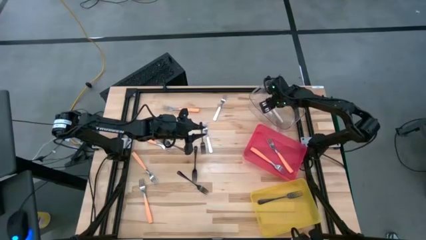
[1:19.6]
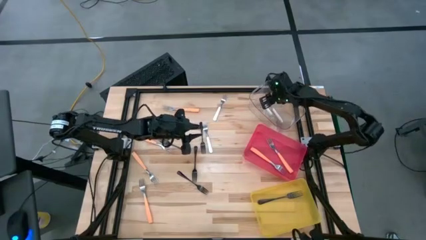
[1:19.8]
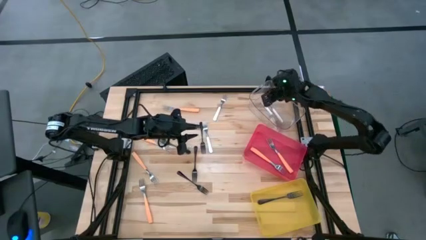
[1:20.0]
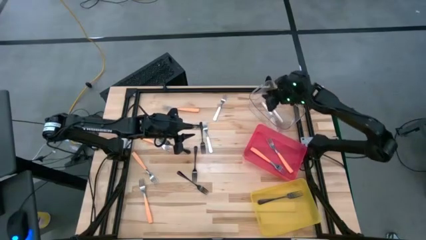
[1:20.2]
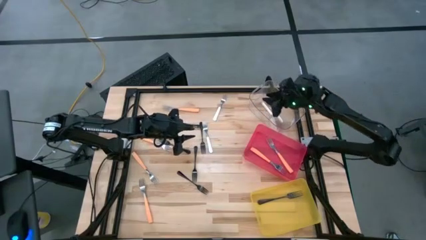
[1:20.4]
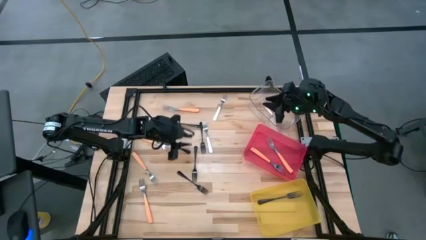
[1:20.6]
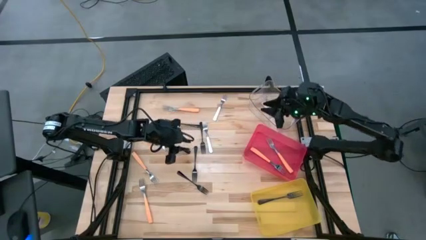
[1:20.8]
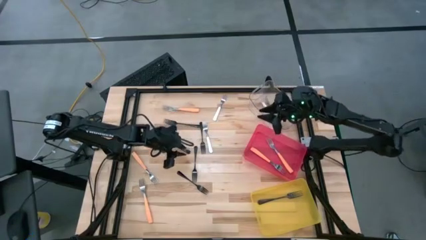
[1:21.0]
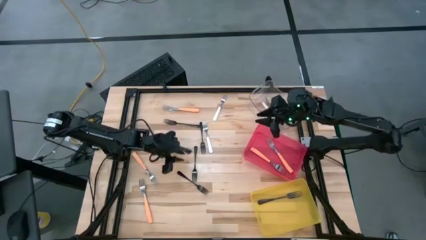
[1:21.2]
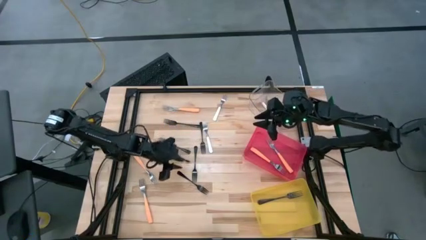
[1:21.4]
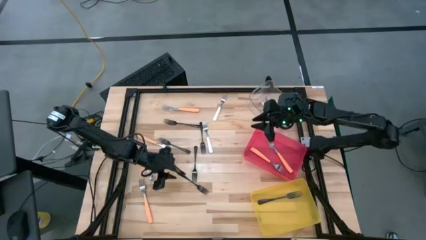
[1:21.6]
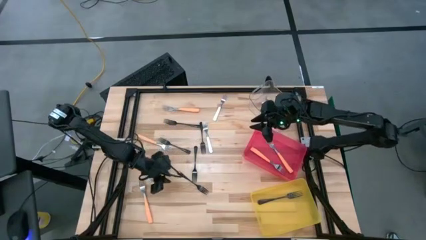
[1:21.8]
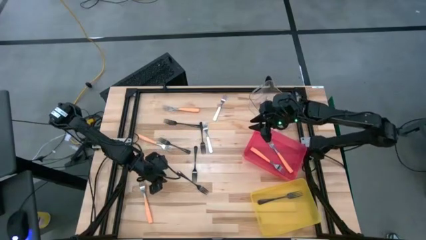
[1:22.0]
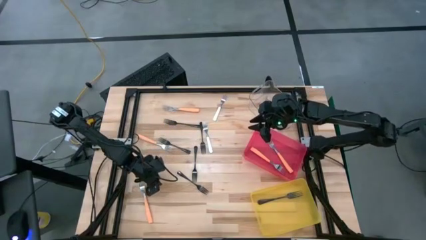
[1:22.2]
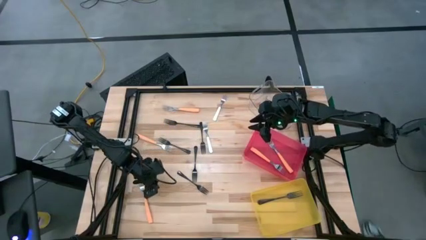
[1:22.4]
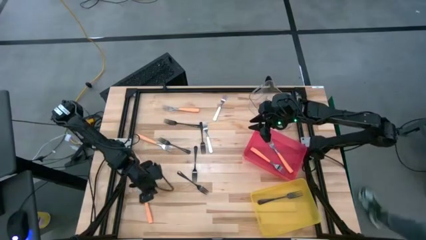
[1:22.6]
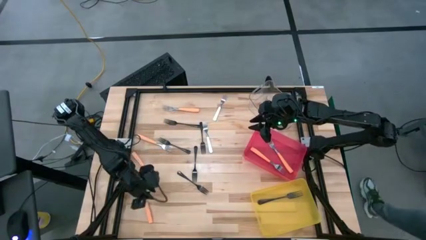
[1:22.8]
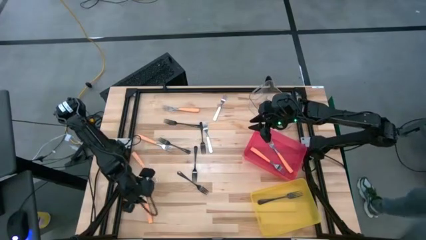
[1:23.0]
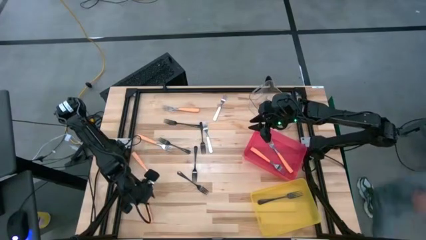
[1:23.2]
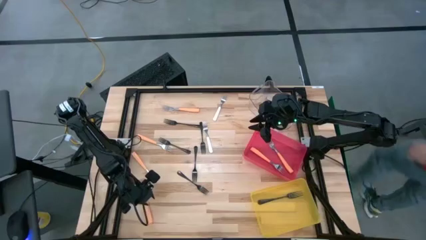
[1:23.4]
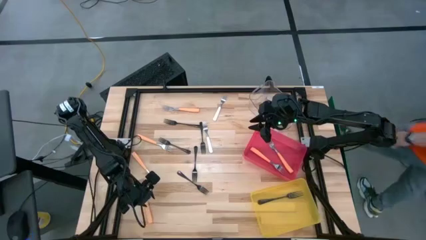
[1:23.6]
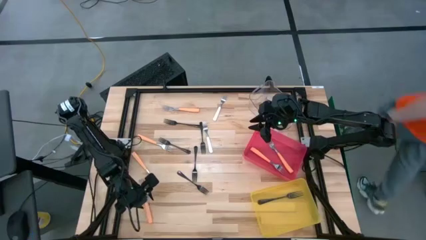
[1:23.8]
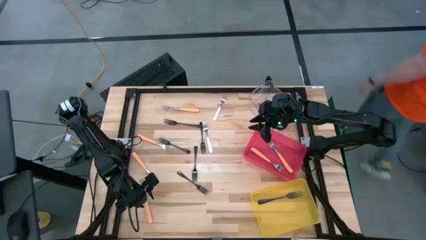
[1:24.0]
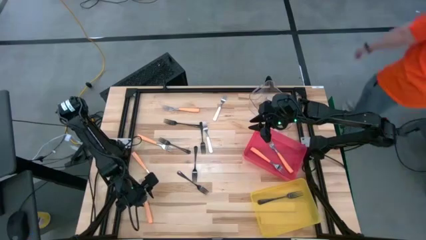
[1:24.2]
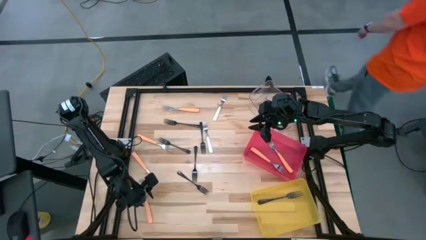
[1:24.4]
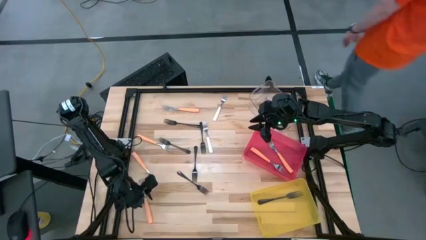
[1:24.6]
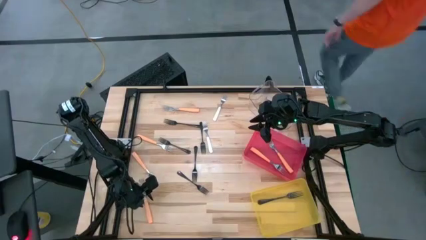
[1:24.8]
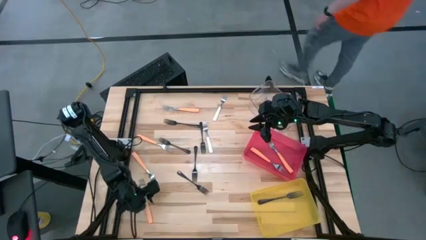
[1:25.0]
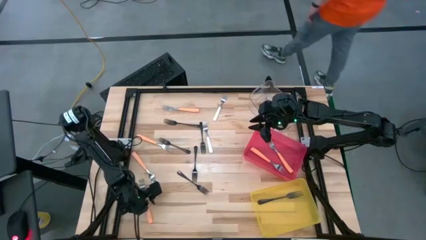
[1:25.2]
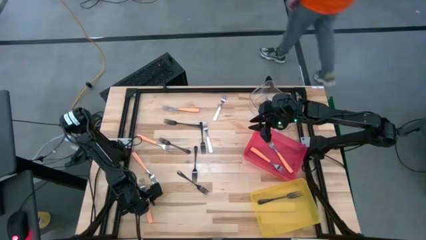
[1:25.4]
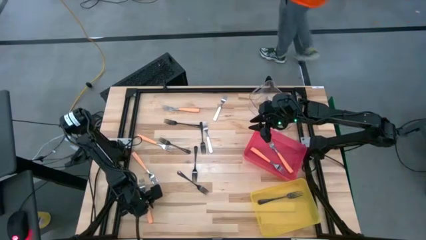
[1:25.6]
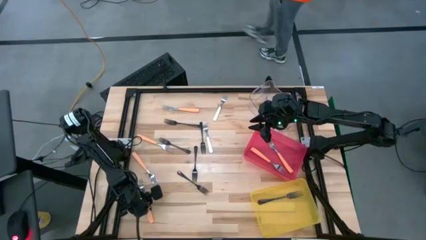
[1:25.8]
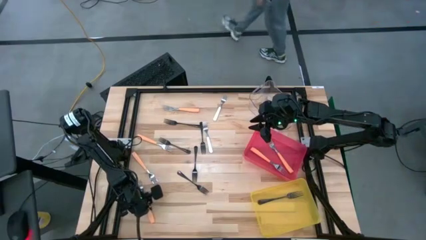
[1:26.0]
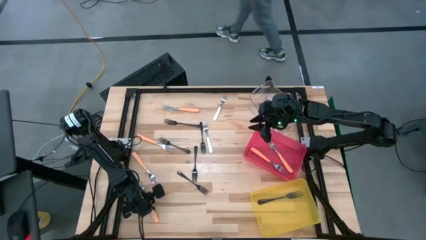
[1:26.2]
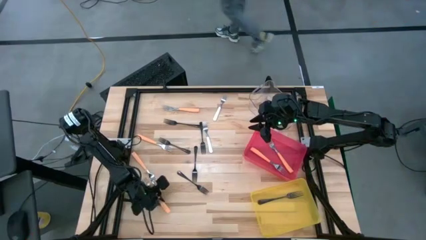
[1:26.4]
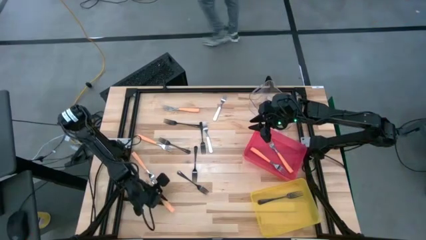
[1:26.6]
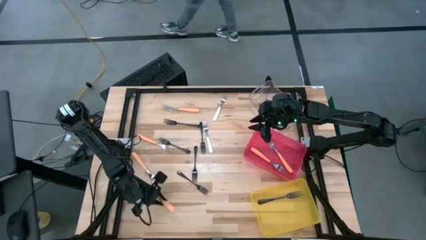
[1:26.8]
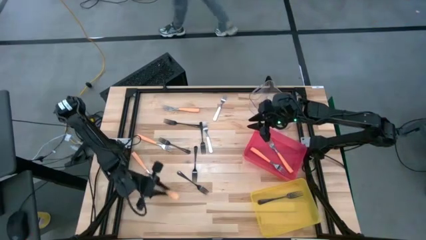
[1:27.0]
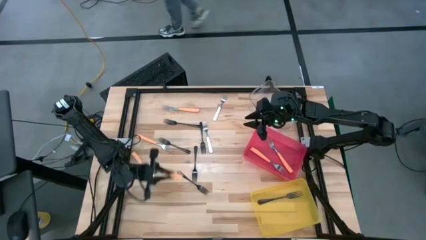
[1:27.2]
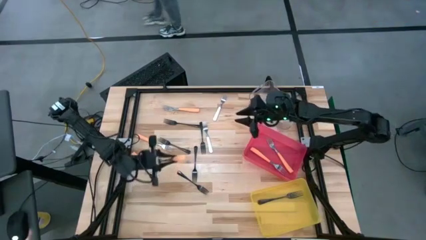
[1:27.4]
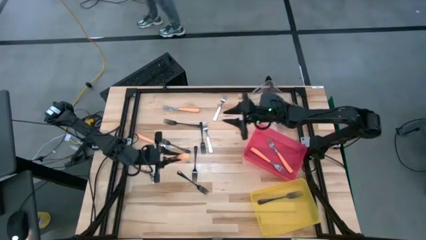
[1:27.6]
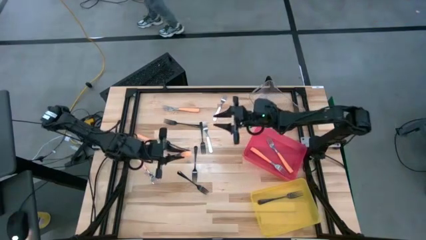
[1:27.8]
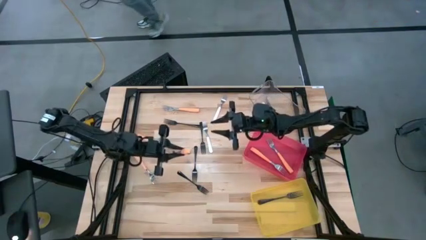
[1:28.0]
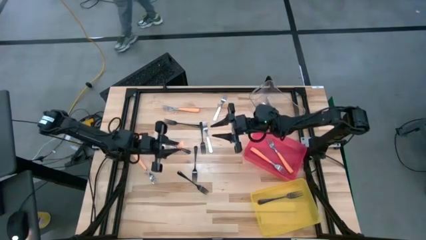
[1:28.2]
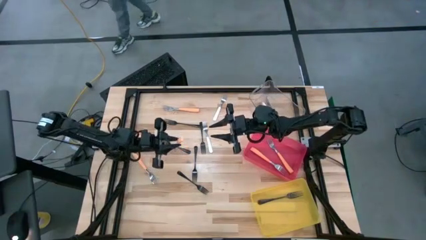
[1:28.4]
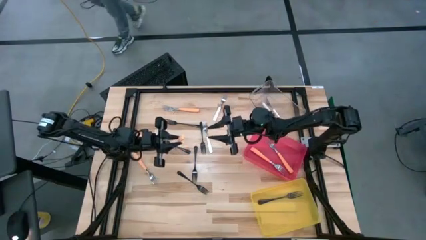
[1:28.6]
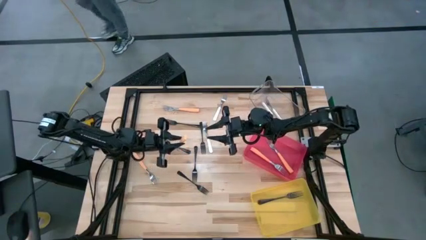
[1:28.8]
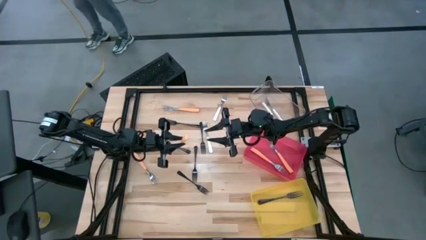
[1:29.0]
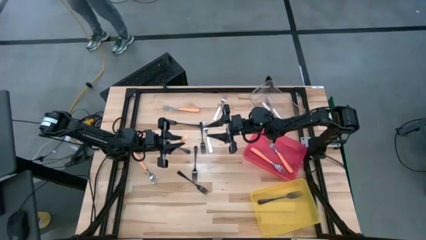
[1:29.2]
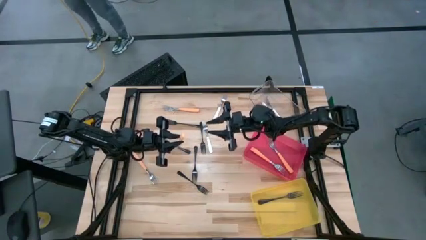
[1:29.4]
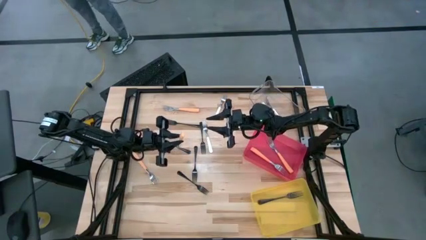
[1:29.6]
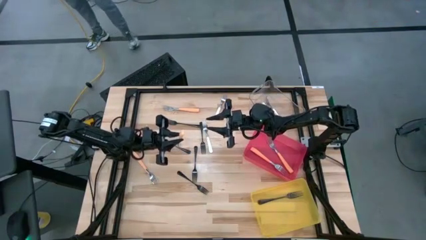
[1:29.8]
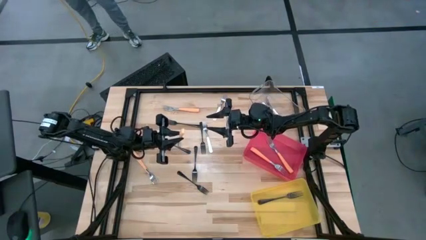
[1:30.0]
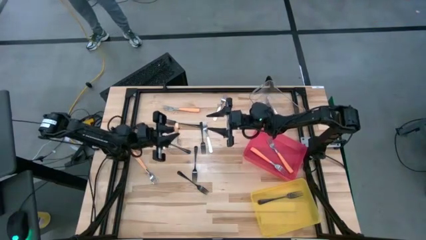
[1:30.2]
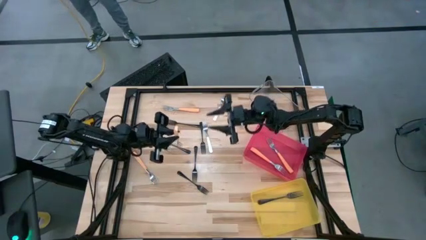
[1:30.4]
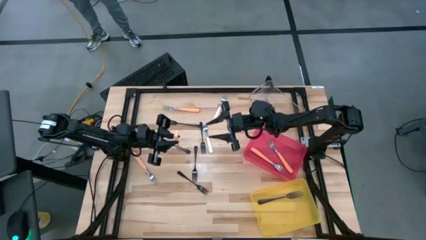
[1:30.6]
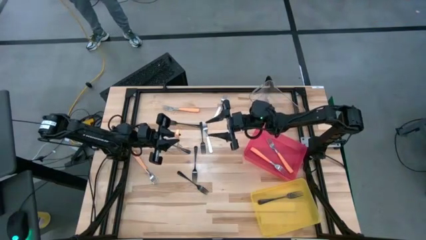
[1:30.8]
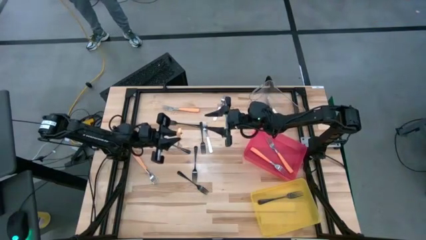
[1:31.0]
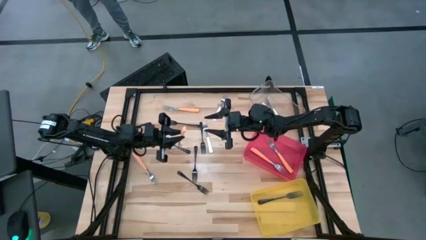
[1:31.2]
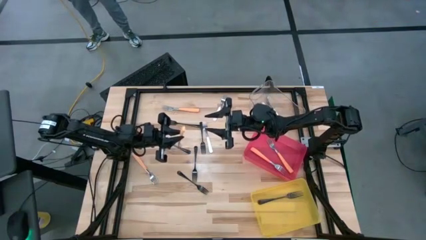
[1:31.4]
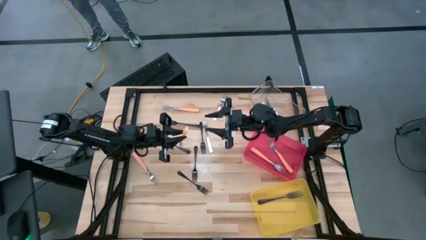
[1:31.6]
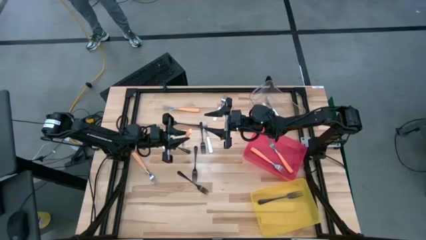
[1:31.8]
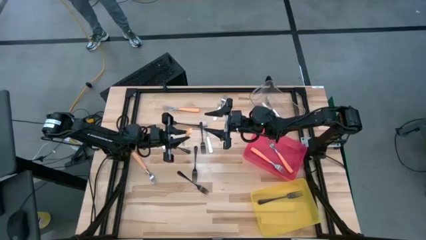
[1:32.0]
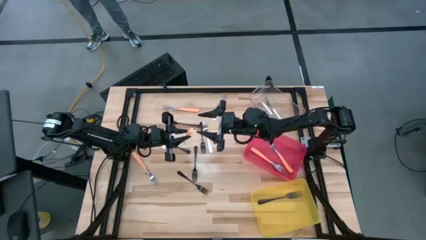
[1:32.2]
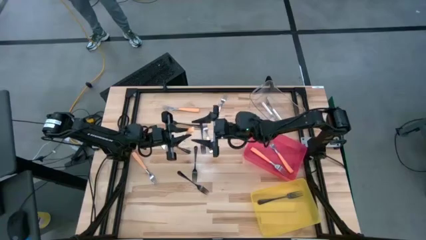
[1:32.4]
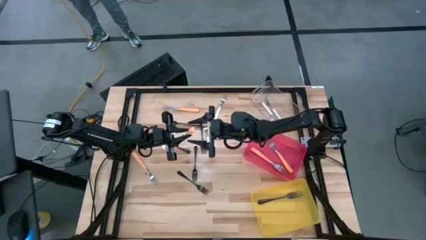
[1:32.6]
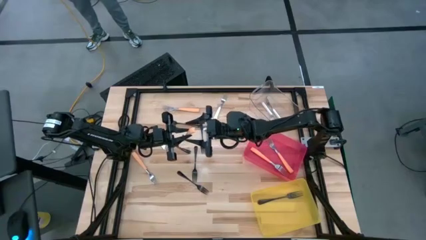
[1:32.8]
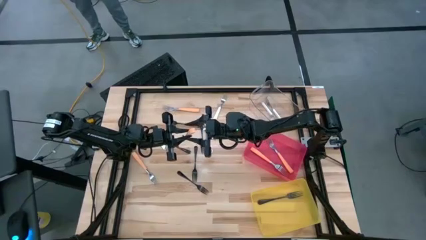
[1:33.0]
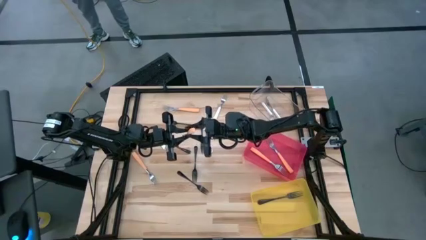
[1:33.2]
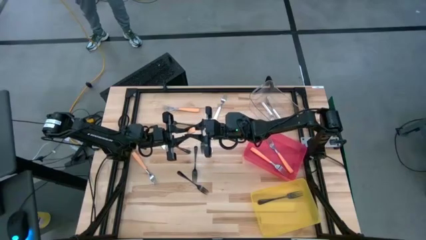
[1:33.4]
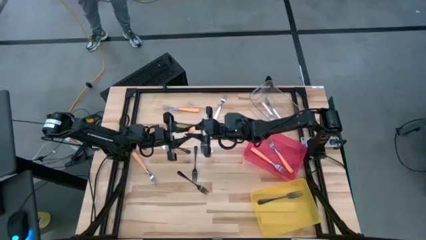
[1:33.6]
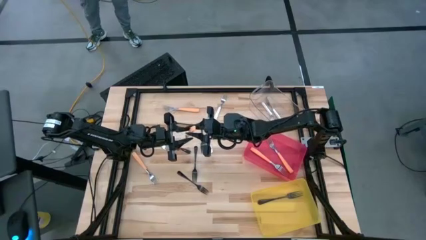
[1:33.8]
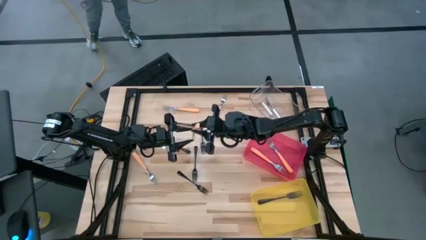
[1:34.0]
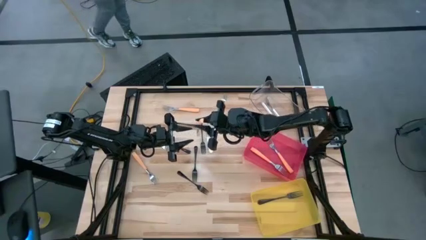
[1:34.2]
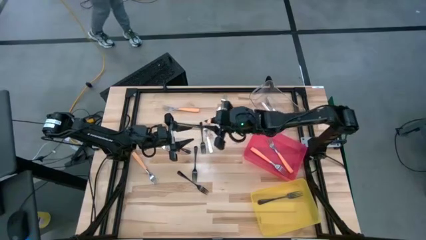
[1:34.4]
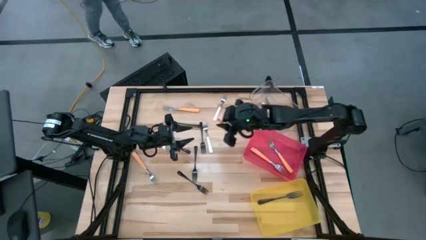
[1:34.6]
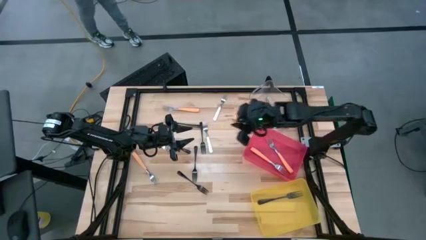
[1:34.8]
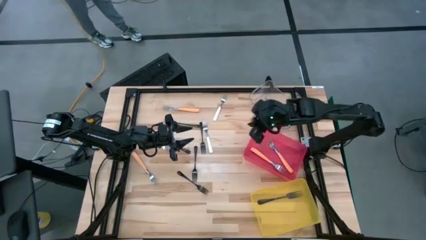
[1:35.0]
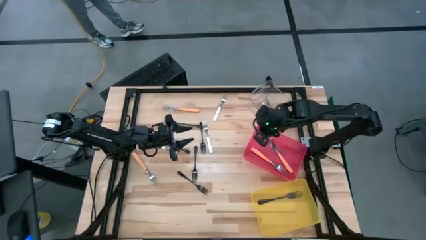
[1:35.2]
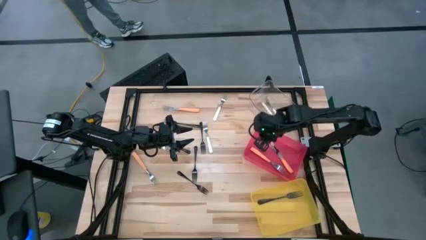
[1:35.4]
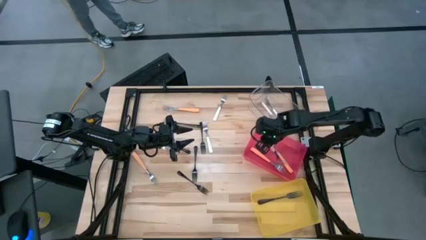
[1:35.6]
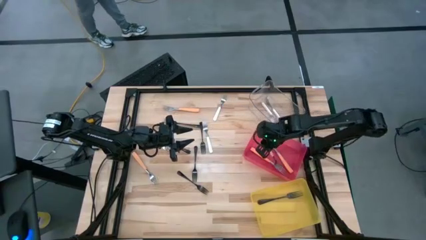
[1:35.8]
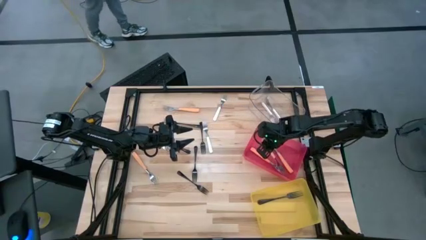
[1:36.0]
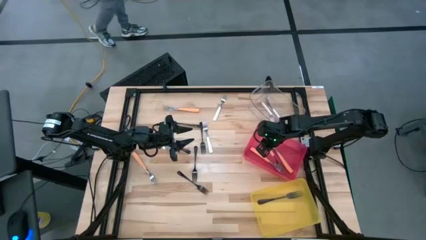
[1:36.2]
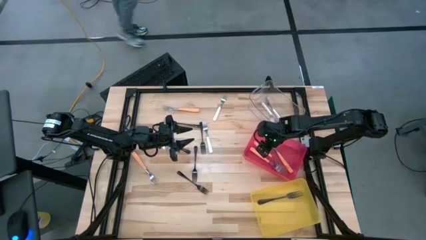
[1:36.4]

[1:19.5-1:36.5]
Task: Sort silverware by color (type)
Put the orange fork into the red bin
